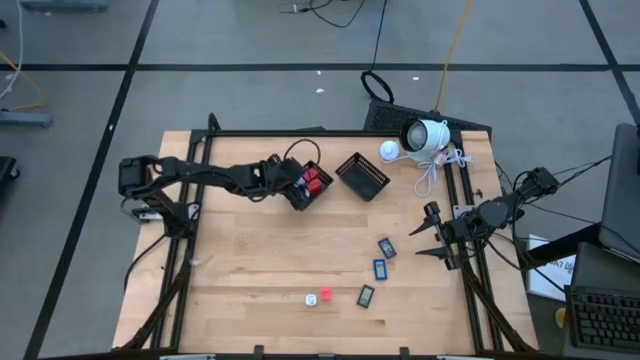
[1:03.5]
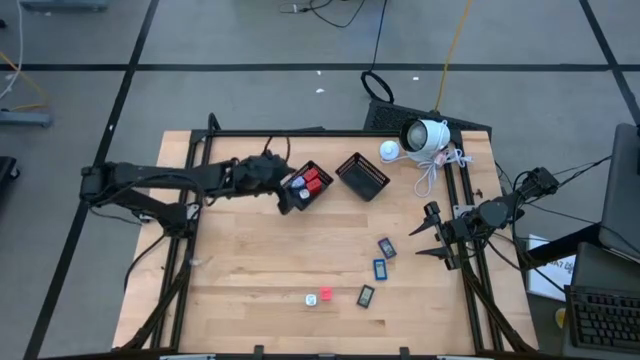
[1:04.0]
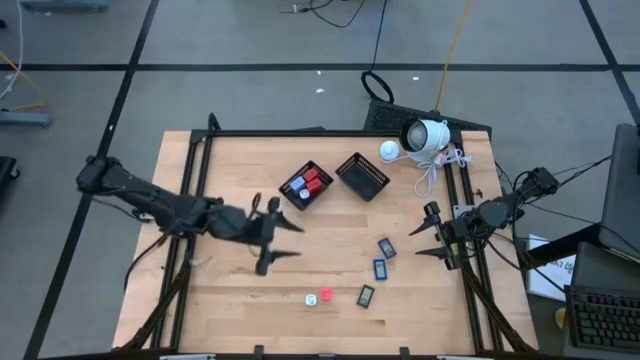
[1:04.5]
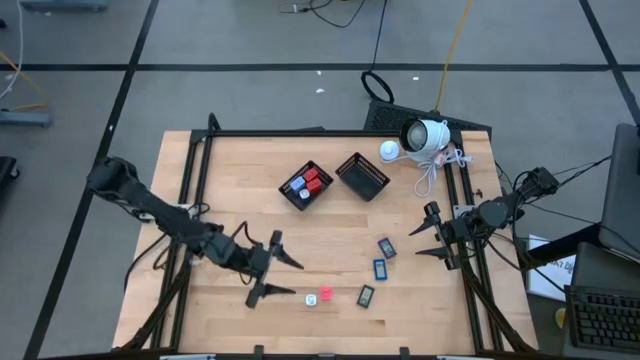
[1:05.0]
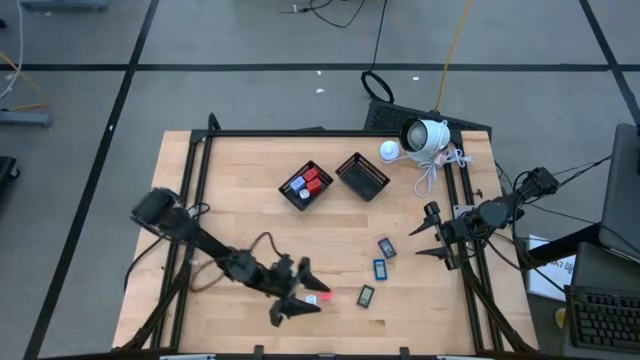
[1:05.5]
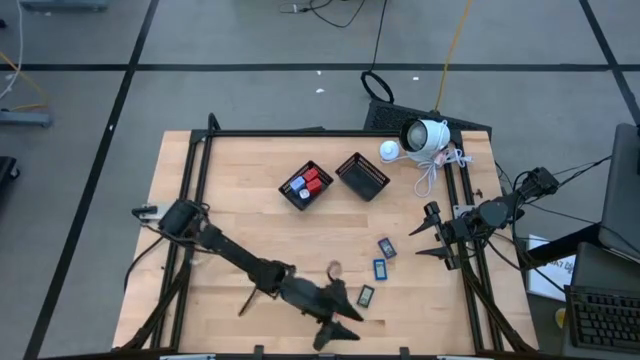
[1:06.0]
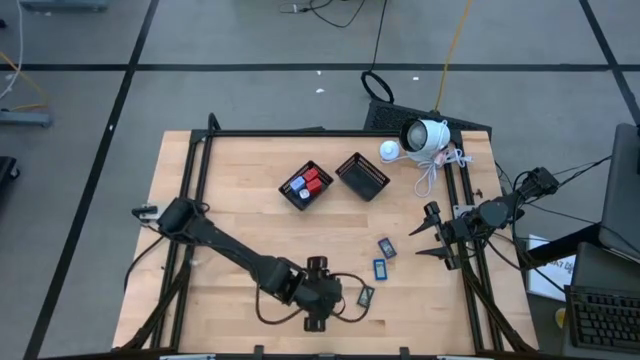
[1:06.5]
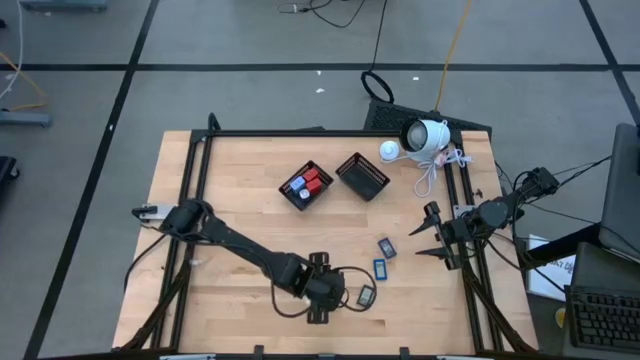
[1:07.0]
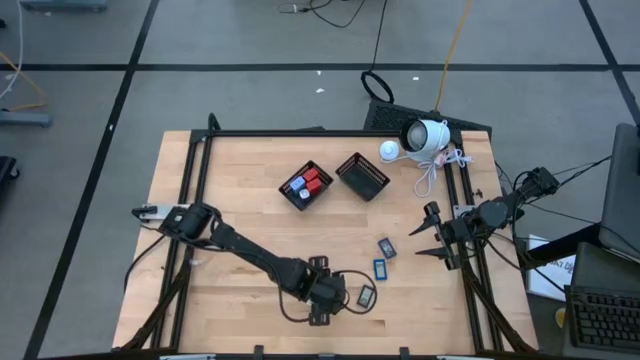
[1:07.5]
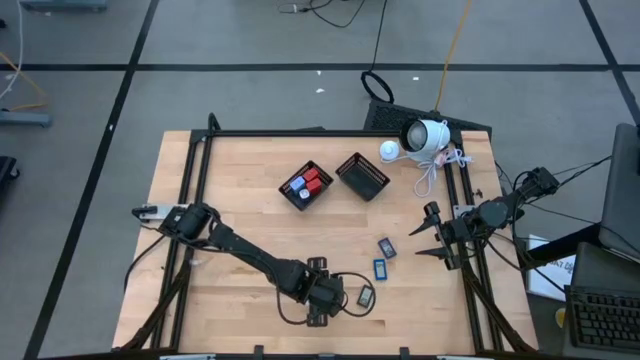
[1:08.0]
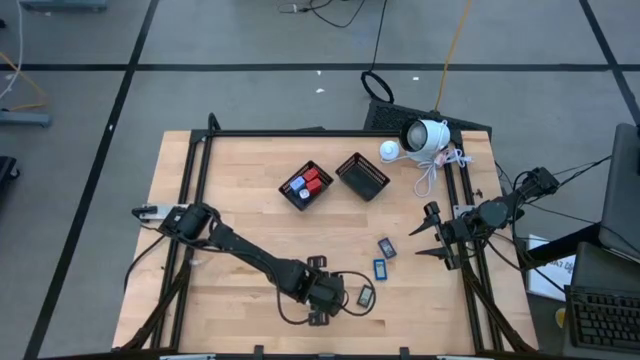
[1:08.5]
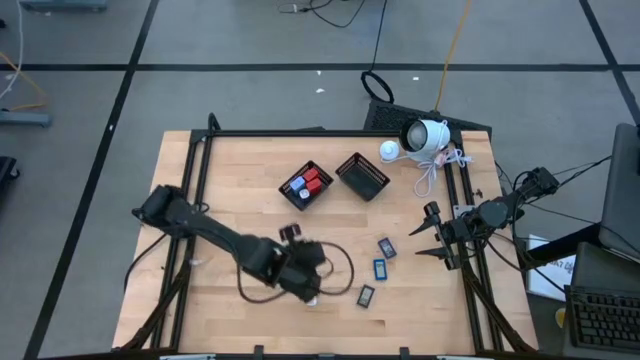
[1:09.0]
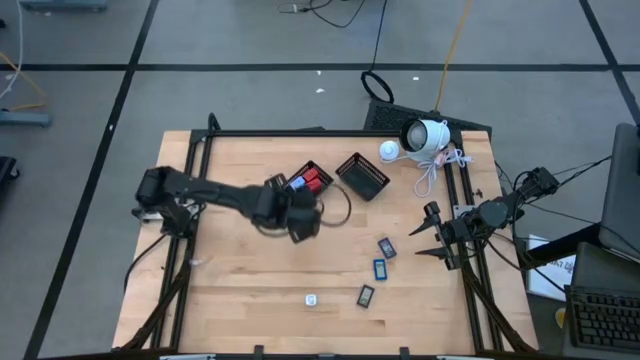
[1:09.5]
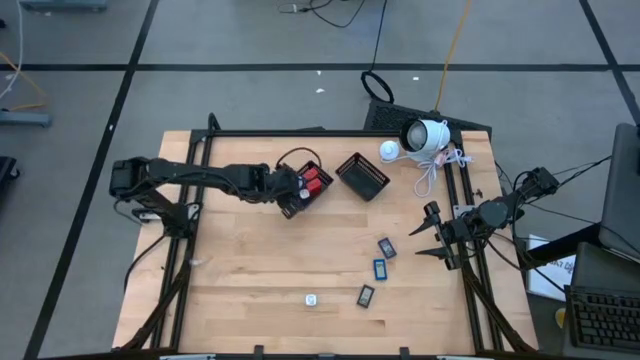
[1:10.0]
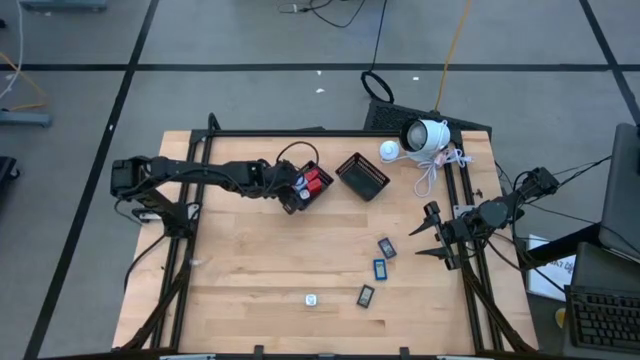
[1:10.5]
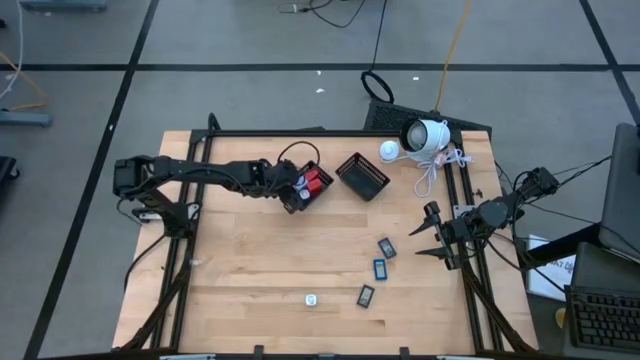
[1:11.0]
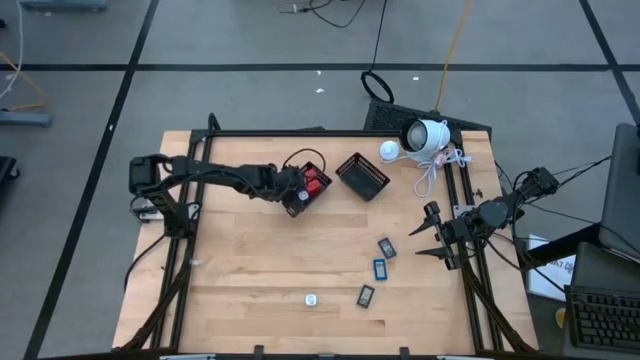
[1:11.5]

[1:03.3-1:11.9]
Task: Pick & Place Office items
Put the pink charger adapter into the left black bin

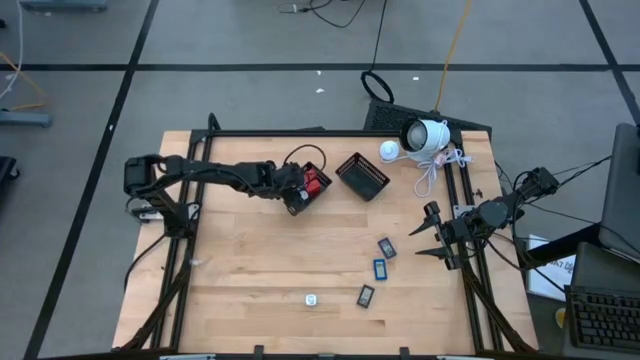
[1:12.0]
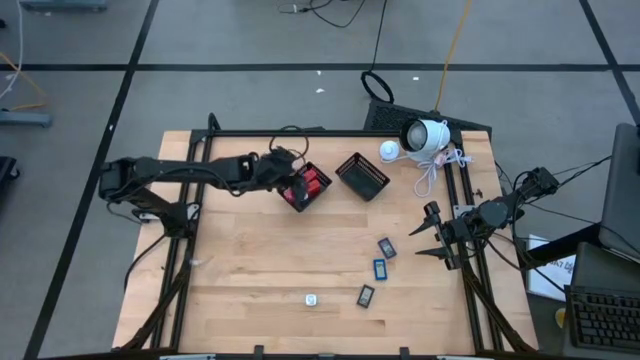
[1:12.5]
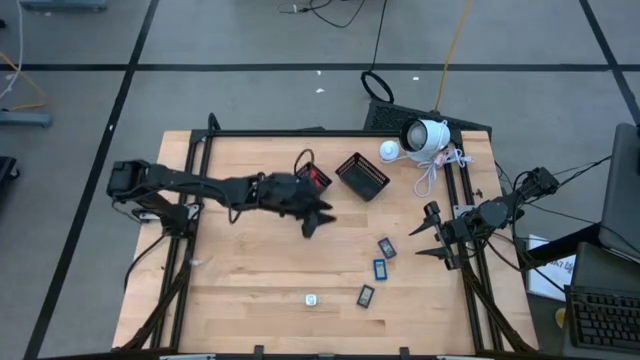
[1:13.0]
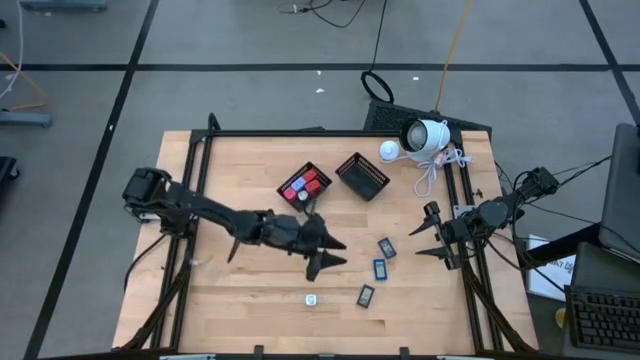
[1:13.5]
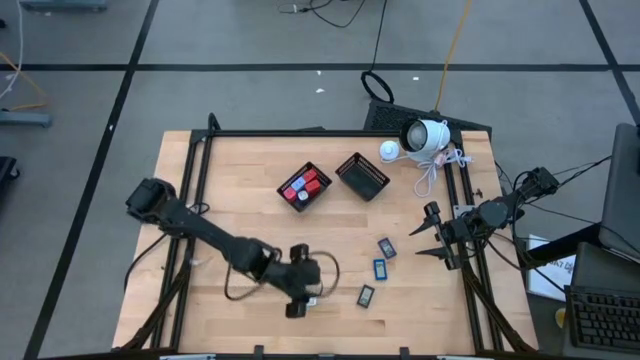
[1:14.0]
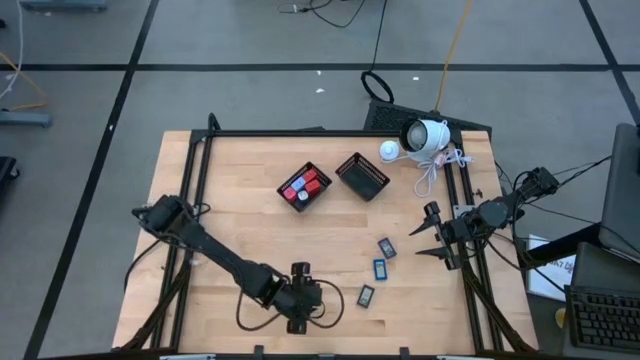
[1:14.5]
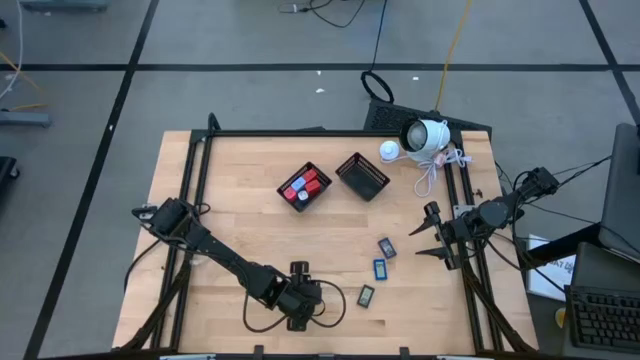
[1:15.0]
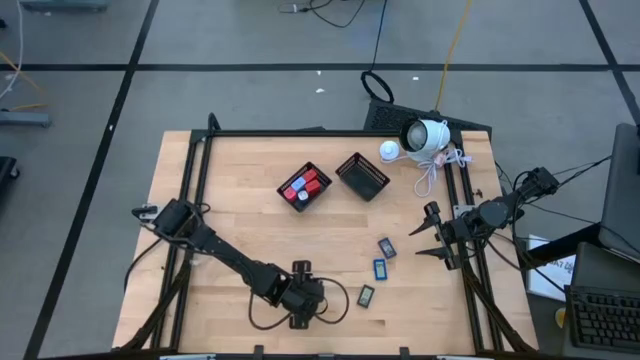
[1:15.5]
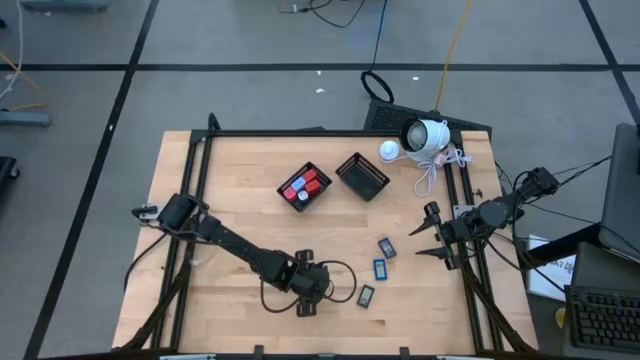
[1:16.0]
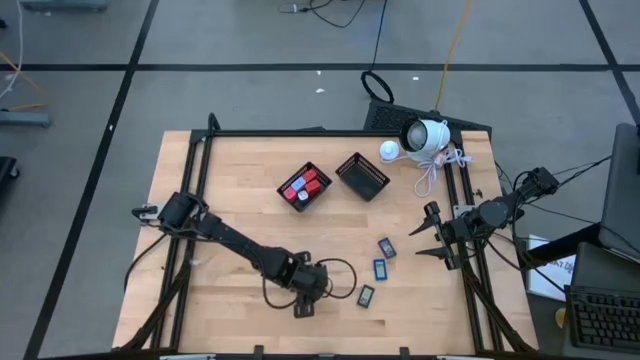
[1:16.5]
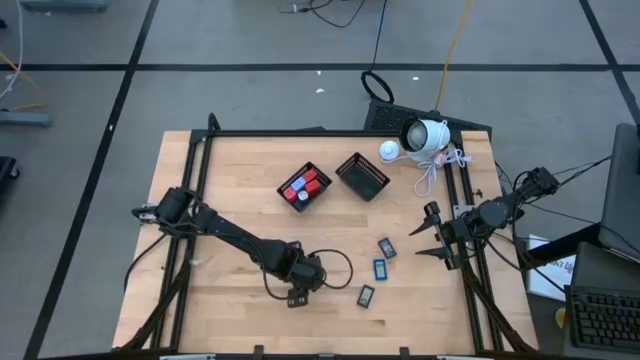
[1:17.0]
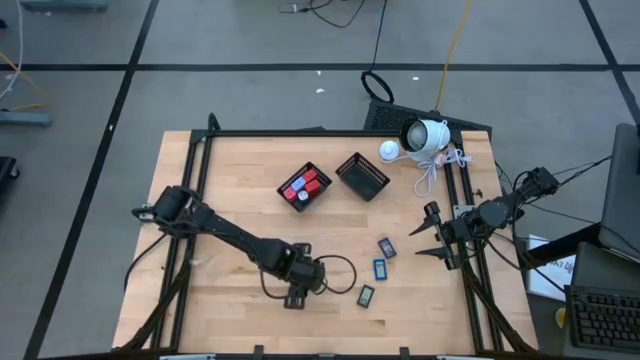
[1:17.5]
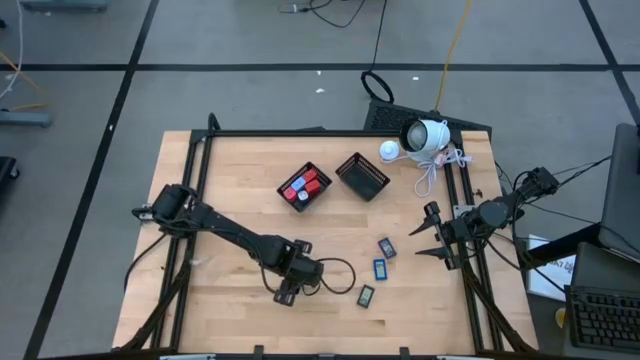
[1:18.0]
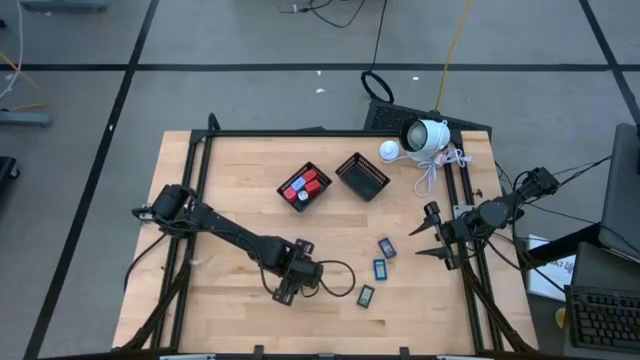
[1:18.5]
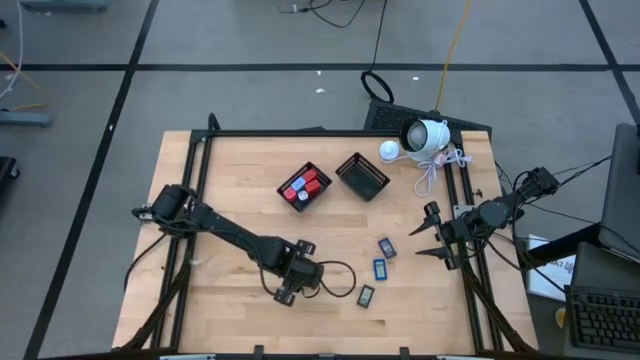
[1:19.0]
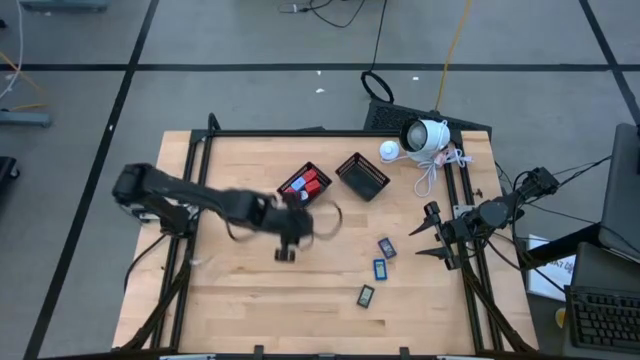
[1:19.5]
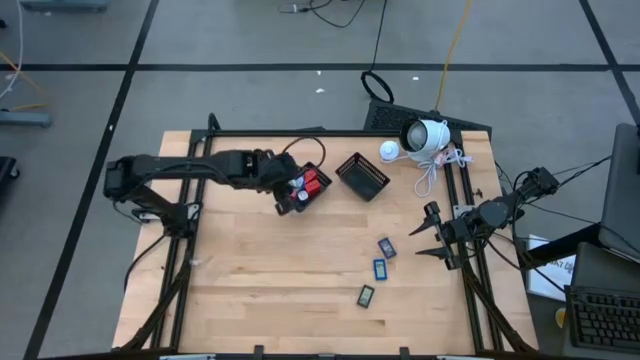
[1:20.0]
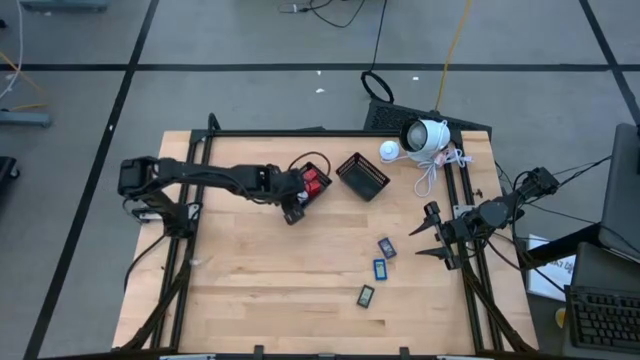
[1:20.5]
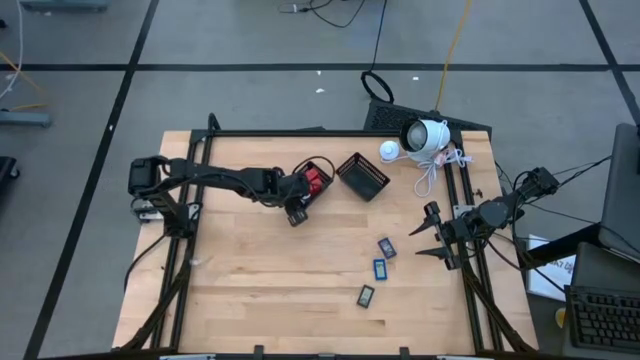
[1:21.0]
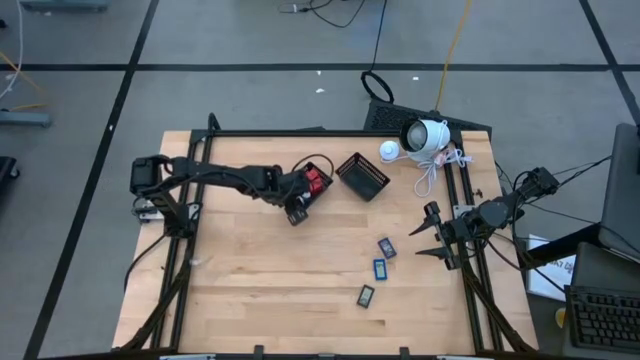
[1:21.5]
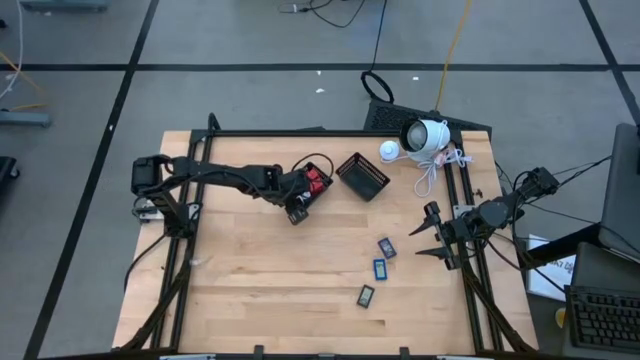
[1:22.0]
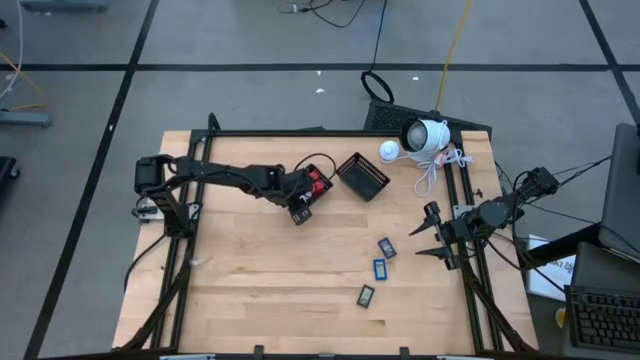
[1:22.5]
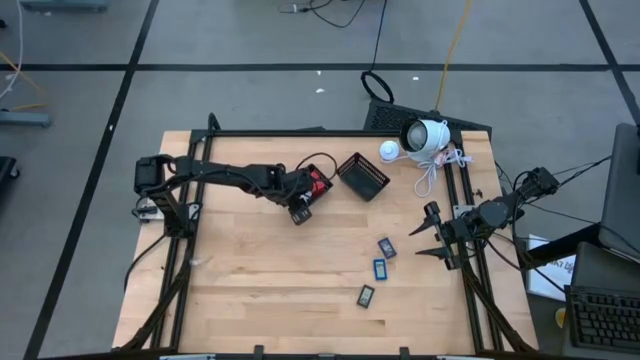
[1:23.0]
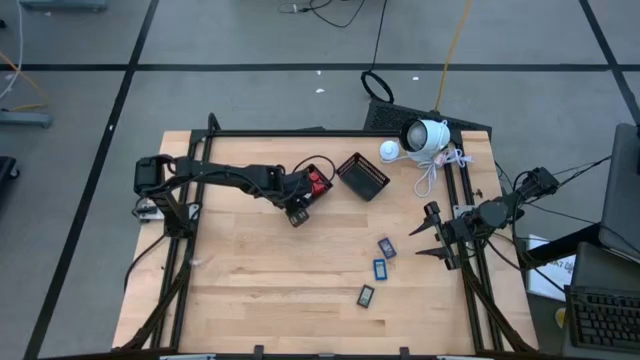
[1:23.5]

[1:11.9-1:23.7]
Put the green charger adapter into the left black bin
